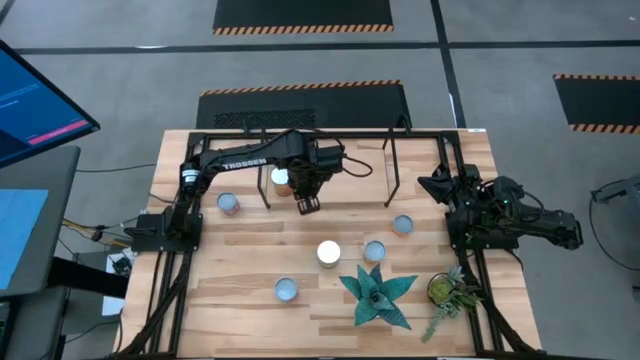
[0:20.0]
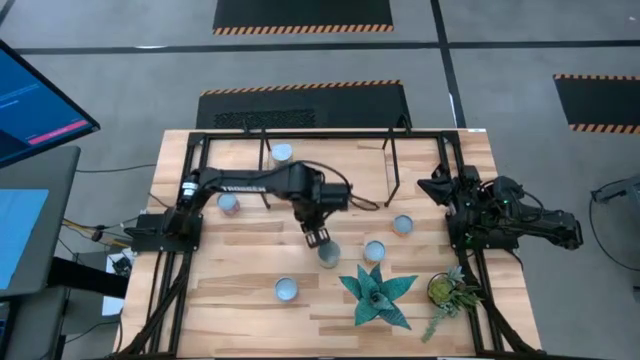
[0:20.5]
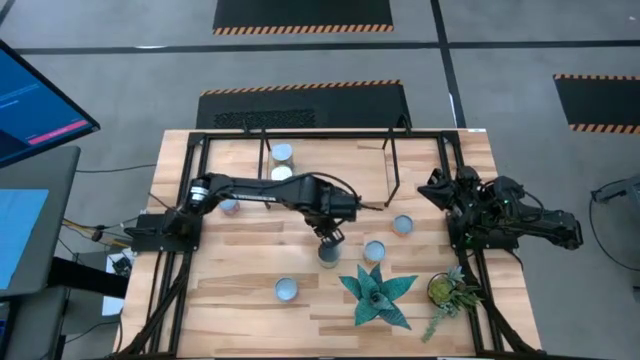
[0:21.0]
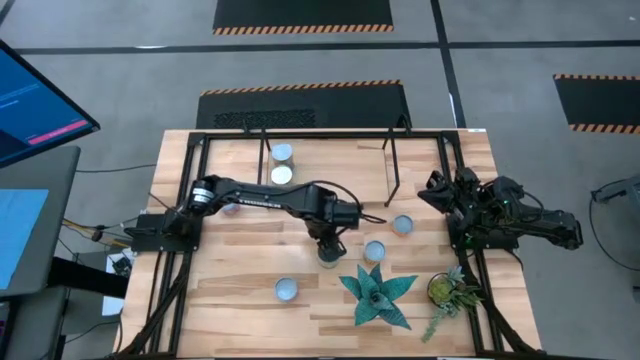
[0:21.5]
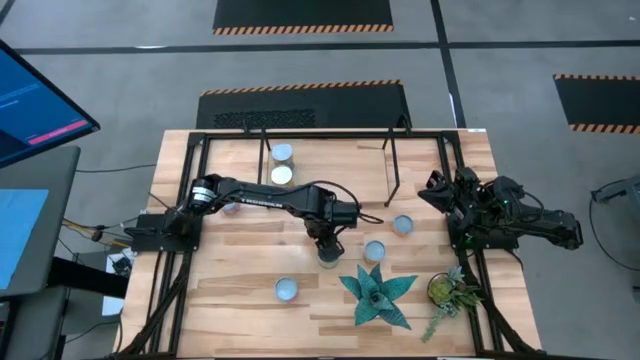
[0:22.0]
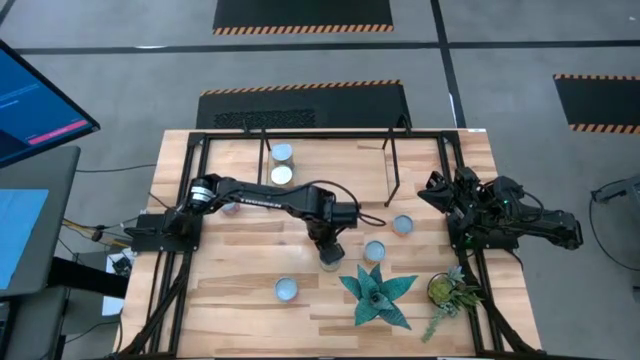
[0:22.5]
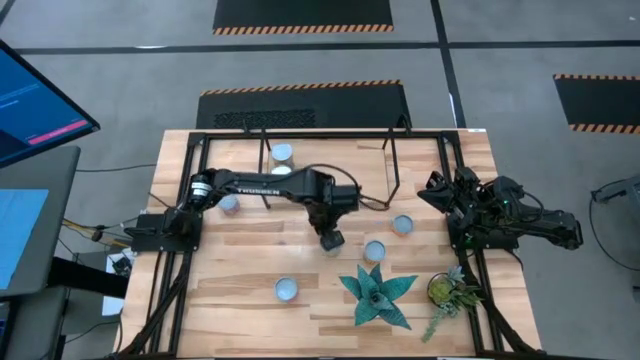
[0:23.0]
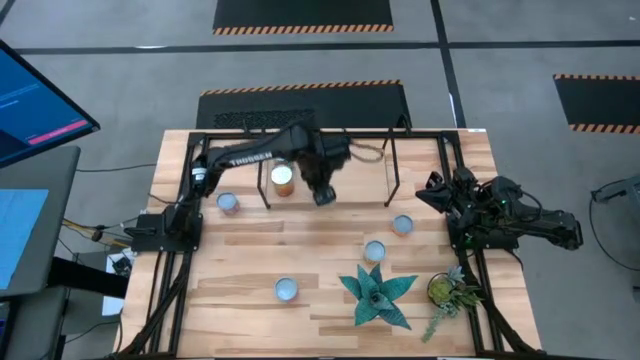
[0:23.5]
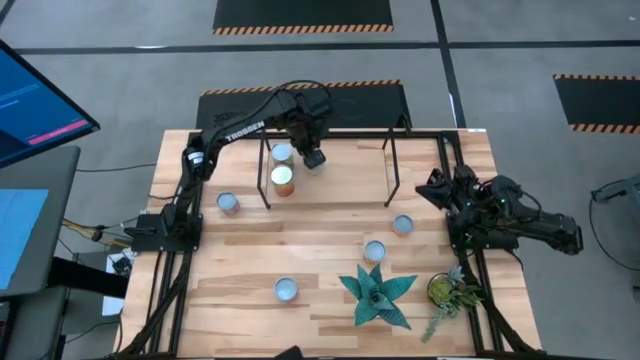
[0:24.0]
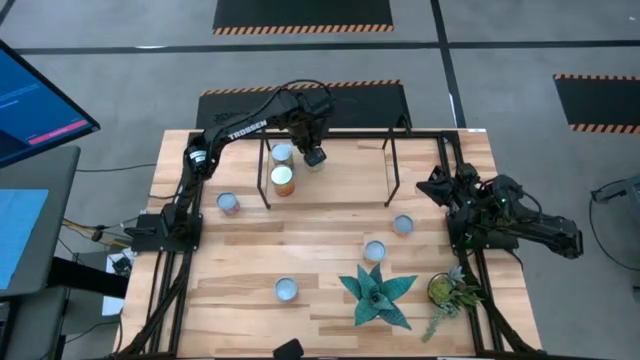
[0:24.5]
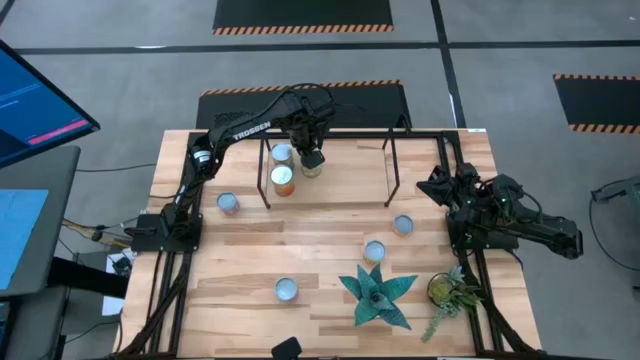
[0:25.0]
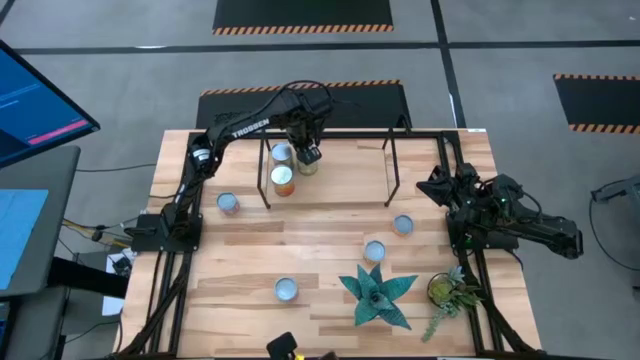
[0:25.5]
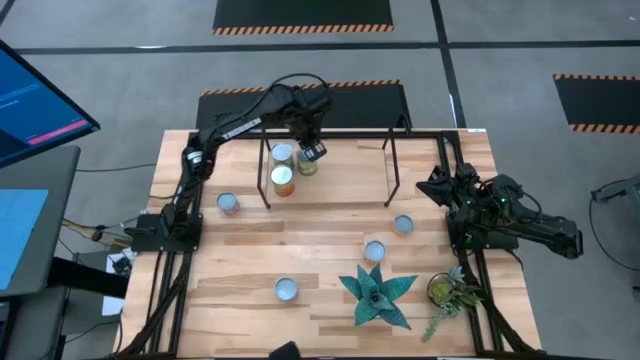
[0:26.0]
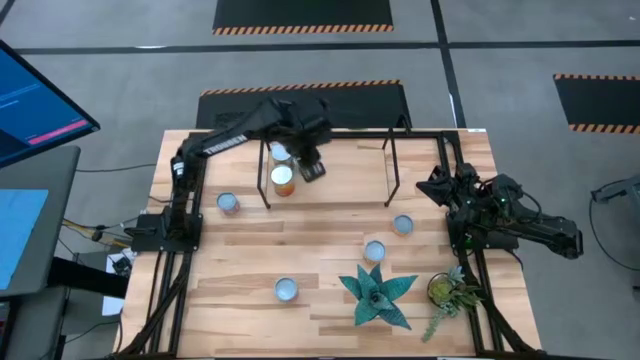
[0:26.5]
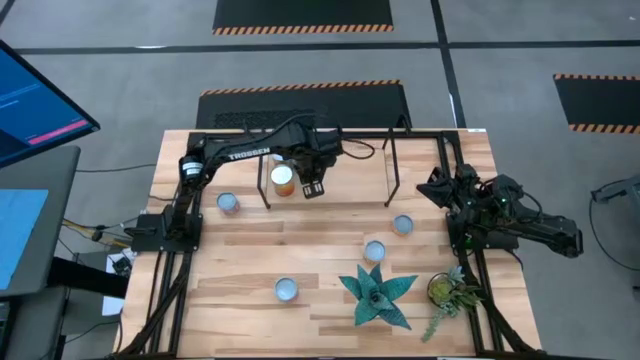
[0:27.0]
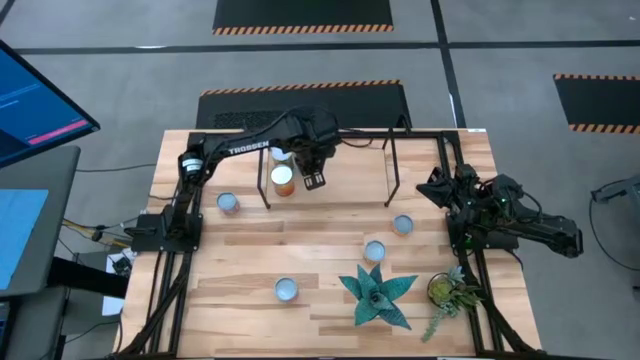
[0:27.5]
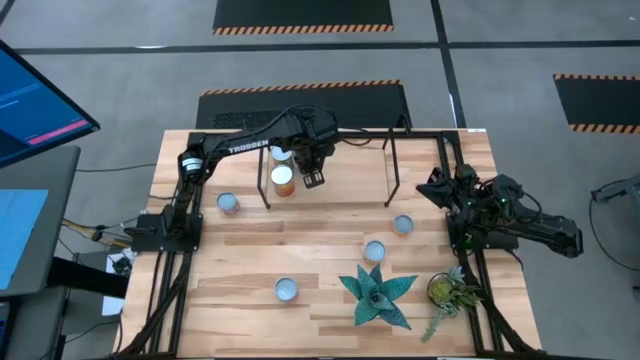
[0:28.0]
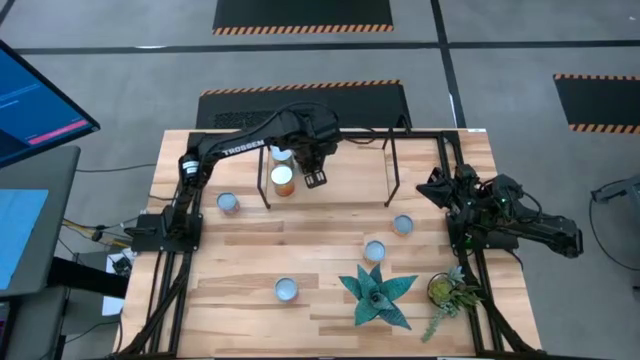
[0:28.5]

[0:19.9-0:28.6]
Task: Pick and place cans onto a shelf
Put the canned pears on the shelf

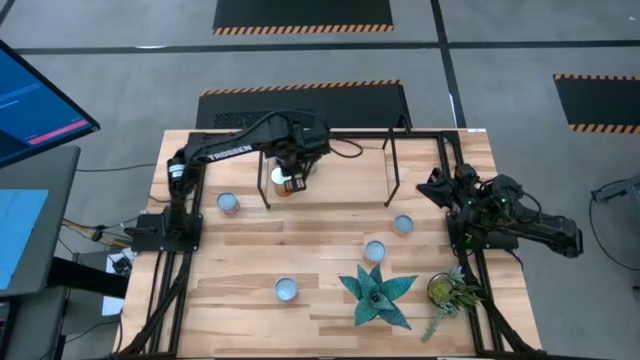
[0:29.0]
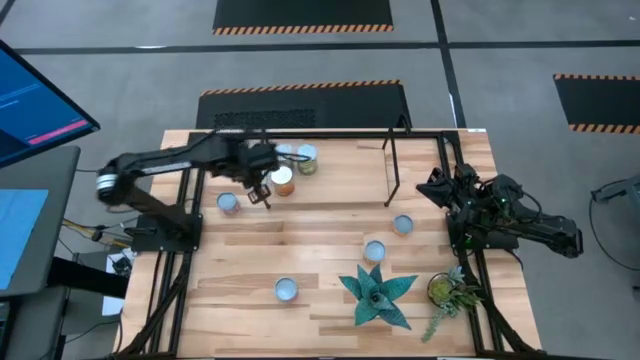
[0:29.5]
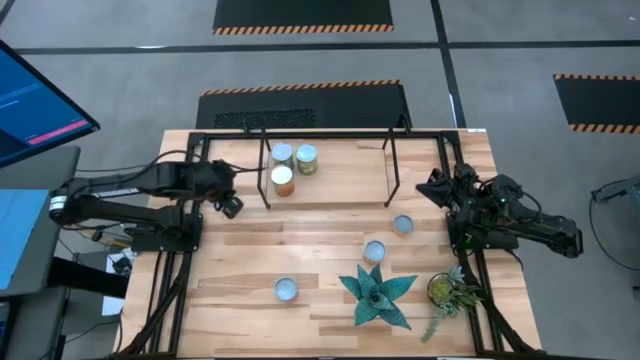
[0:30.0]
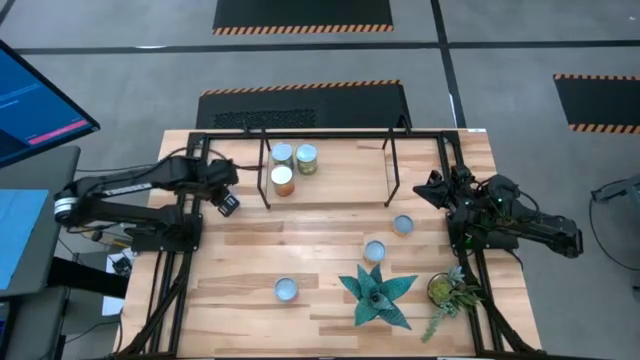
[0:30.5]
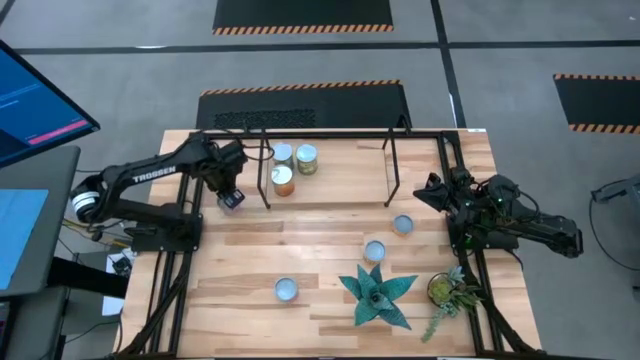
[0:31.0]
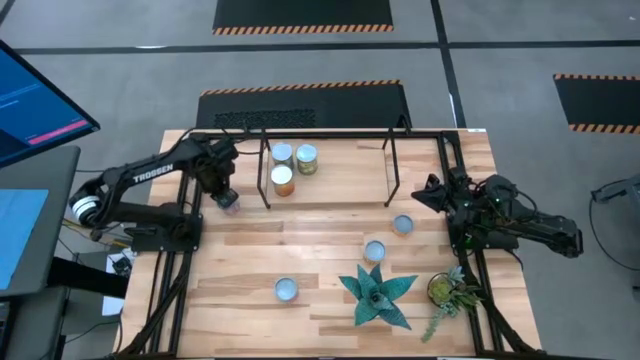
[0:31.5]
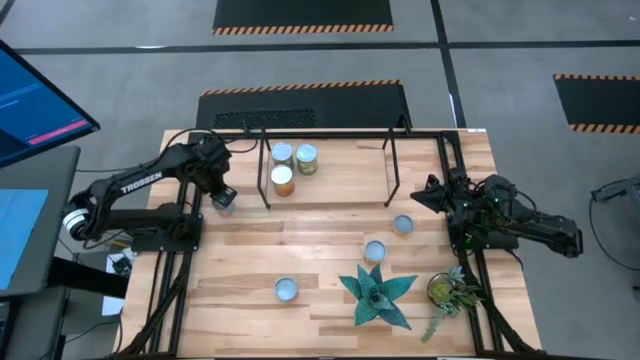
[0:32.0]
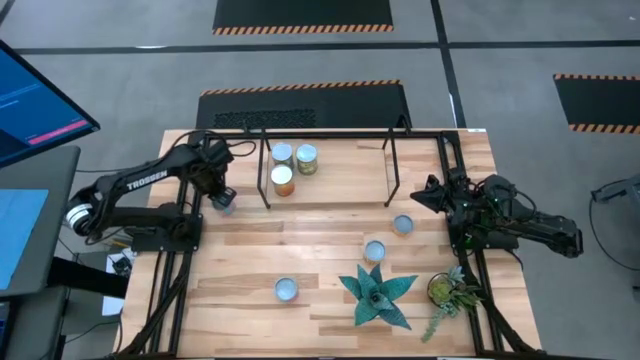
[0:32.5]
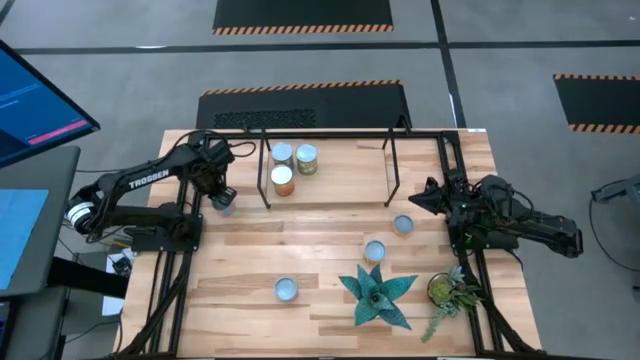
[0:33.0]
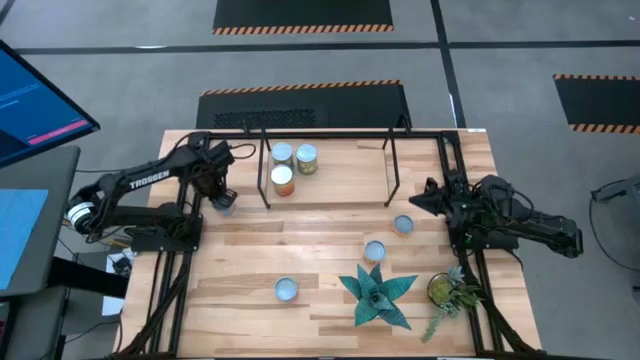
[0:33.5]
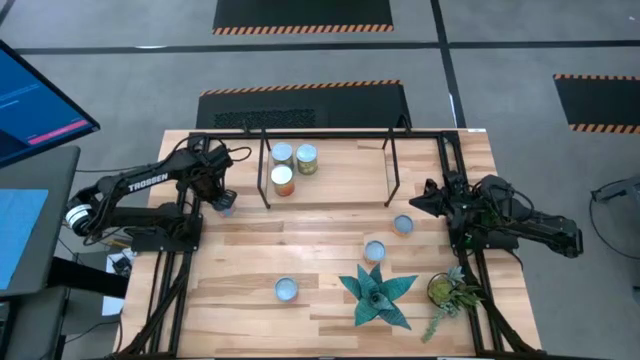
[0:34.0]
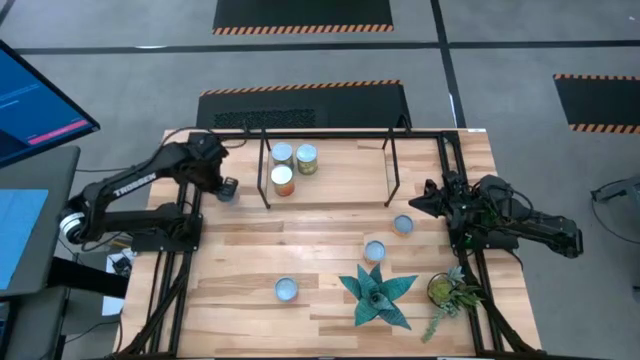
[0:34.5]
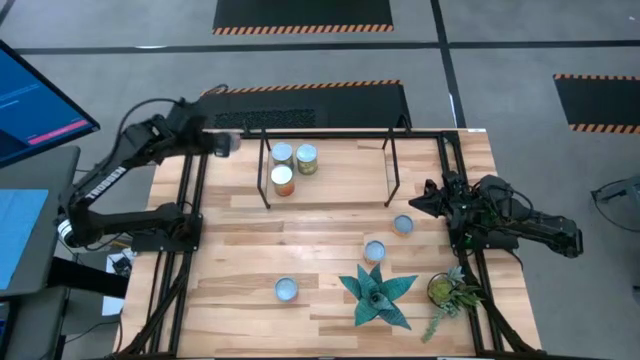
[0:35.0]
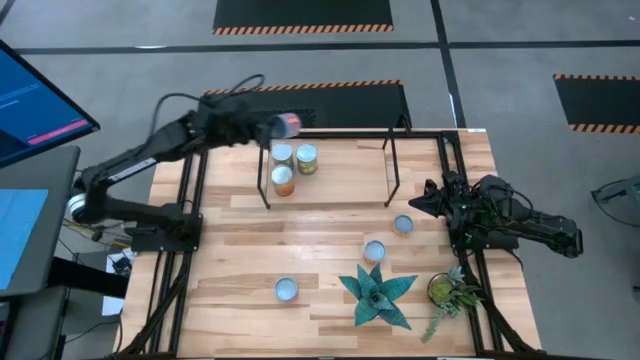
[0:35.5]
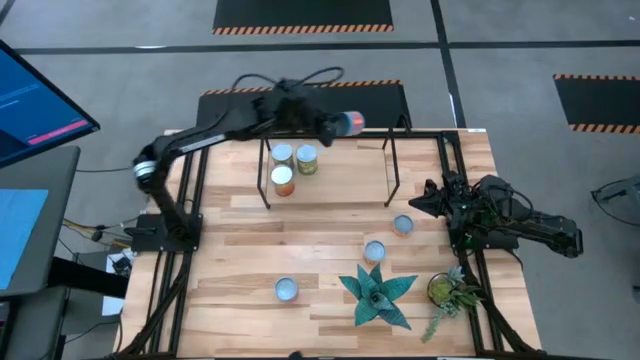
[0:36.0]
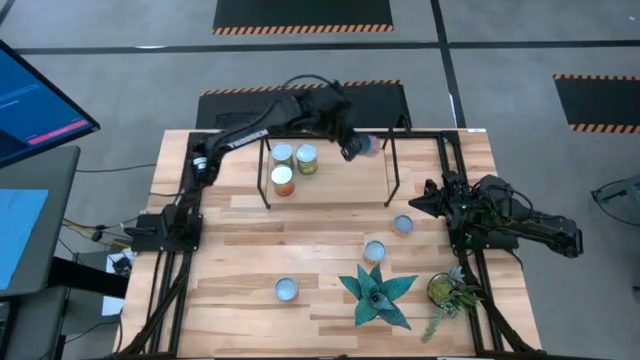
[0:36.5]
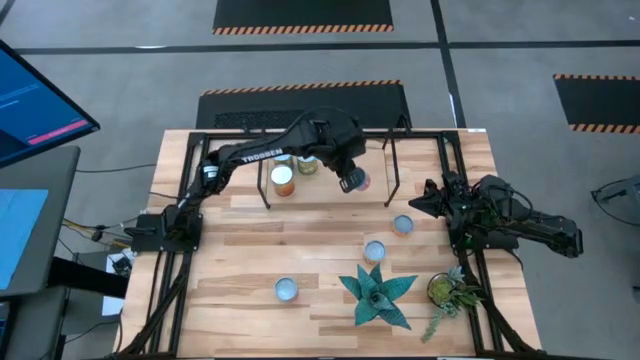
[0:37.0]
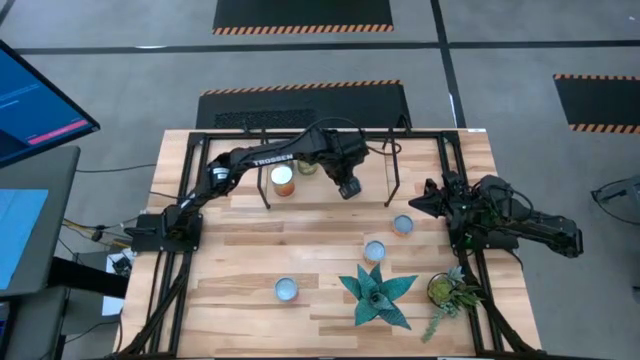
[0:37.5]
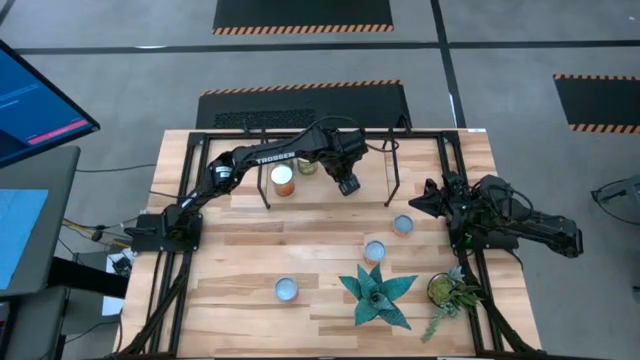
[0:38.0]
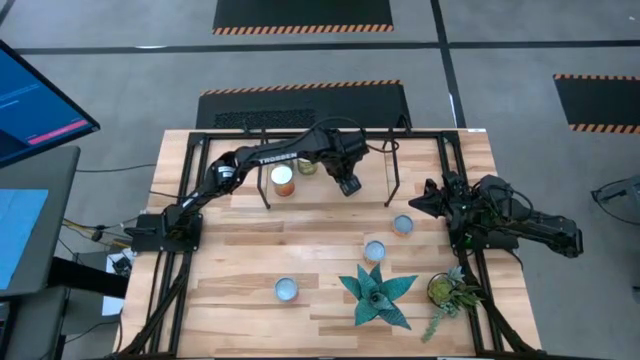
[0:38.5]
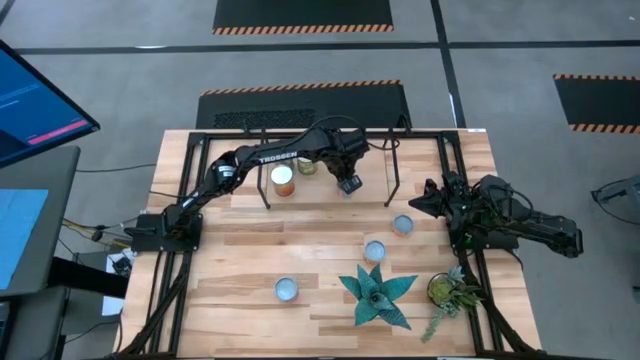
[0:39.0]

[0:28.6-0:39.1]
Put the canned corn on the shelf
